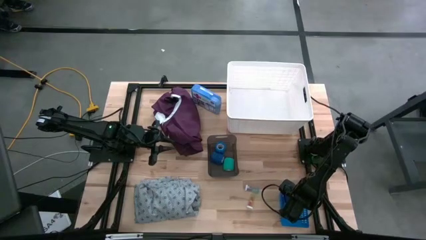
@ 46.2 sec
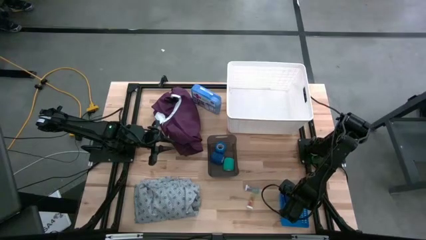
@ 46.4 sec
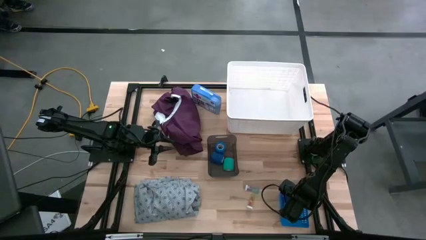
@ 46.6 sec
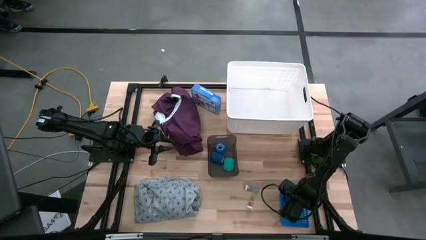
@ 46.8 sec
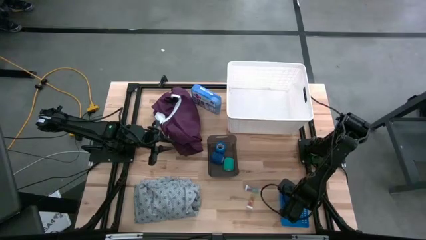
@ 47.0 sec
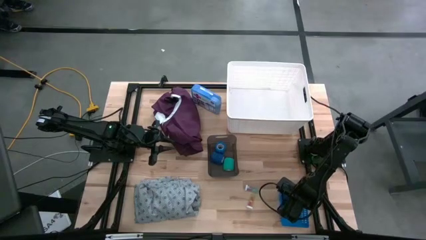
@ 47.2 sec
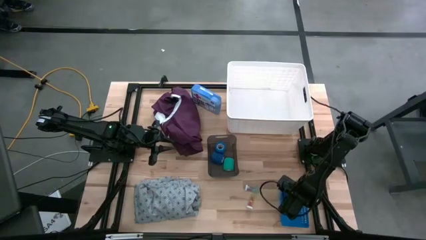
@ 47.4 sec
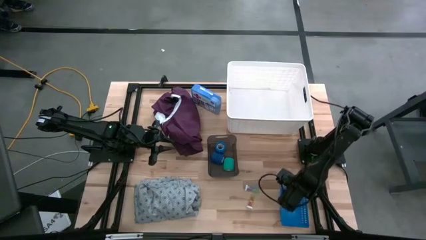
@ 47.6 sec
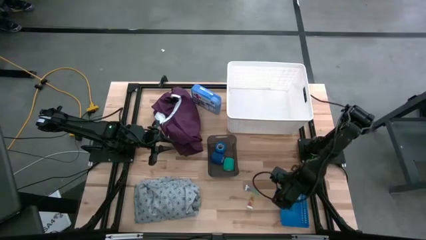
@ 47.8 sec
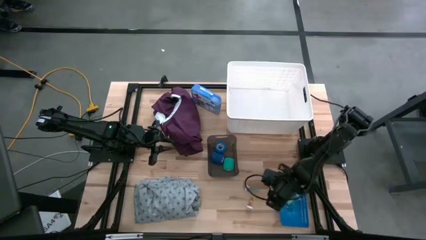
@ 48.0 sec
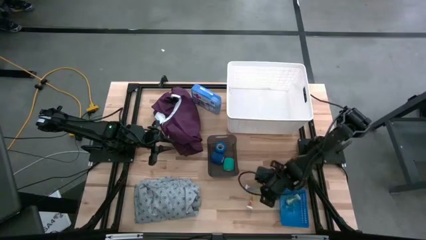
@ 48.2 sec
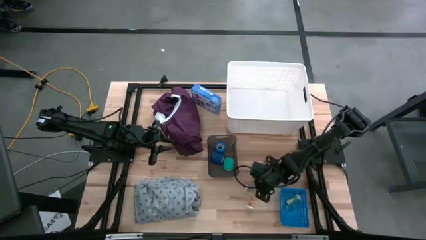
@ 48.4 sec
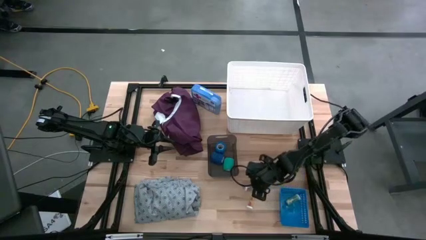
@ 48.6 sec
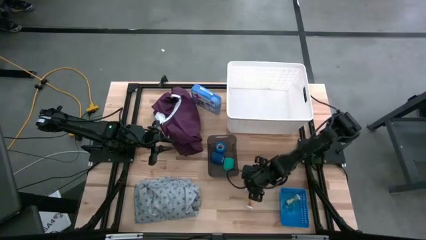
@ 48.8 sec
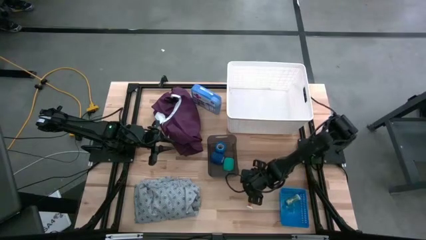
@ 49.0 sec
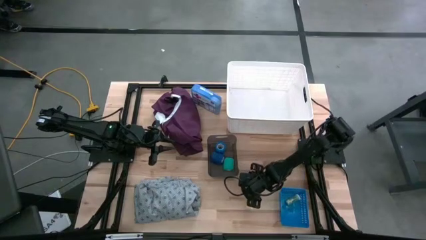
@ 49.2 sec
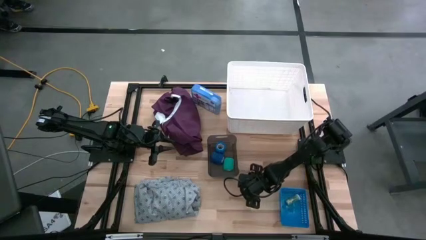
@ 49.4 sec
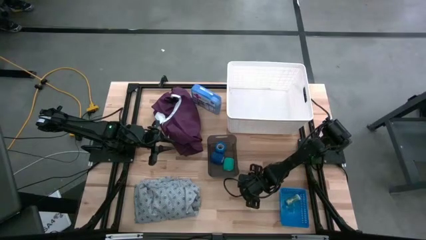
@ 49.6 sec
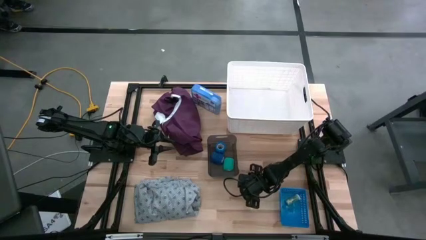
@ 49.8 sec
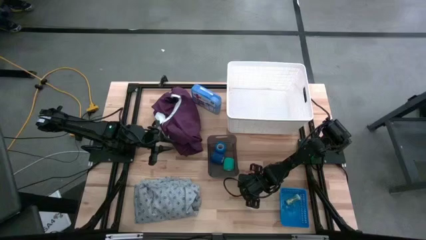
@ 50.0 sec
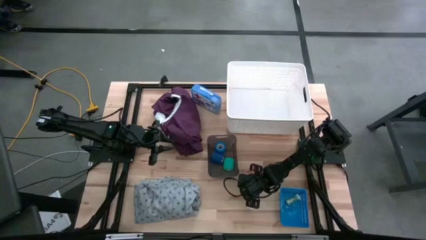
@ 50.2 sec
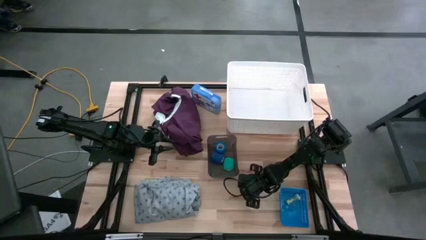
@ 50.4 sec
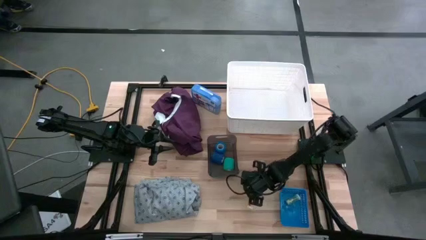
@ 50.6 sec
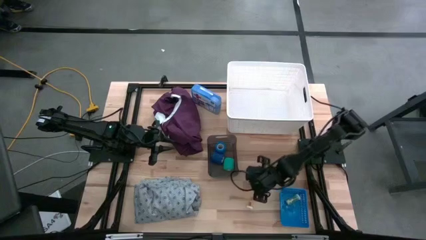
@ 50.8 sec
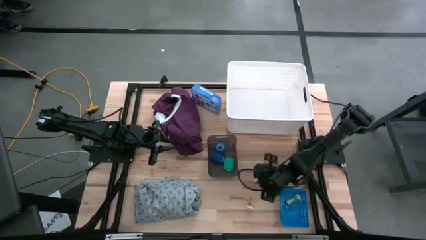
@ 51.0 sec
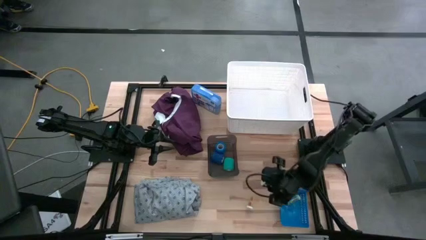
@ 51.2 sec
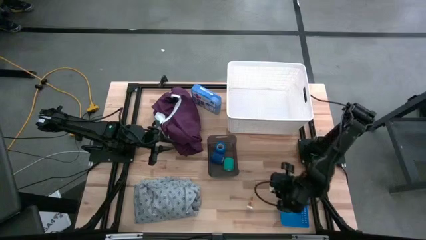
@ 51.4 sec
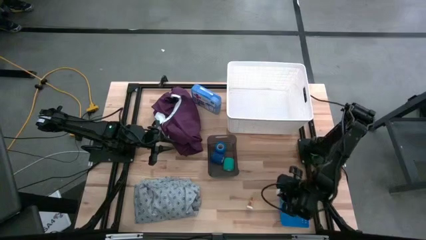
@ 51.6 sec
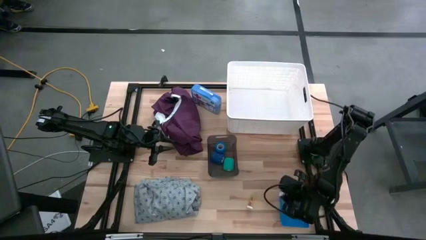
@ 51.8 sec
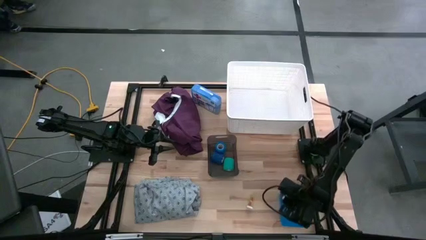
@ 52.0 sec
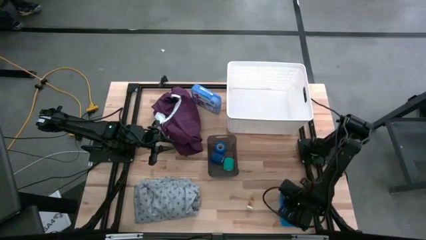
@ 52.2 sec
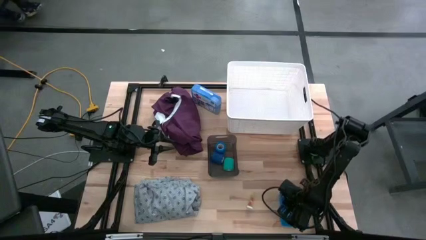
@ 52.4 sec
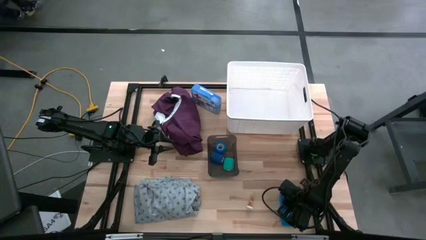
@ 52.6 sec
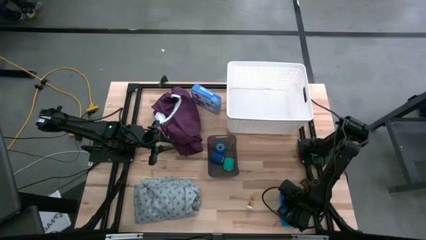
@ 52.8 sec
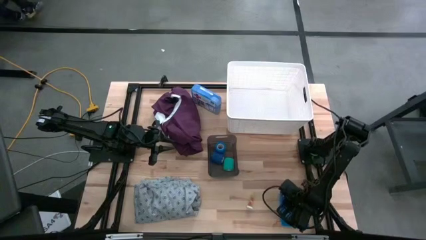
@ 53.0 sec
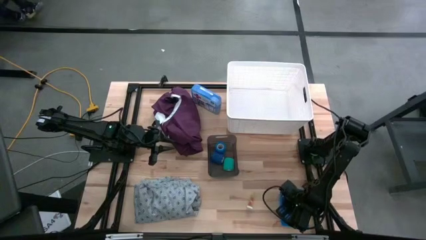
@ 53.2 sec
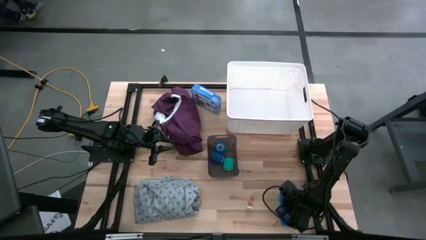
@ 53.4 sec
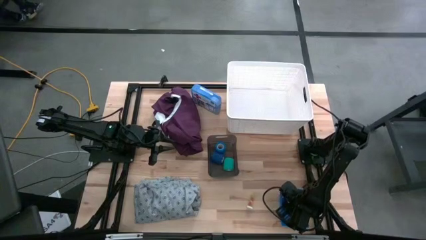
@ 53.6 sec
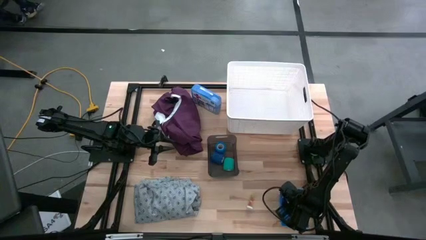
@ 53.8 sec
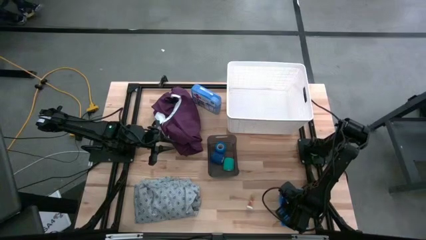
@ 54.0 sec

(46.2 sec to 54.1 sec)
Task: Pick & Place Medicine items
Put the blue pill bottle into the blue bin

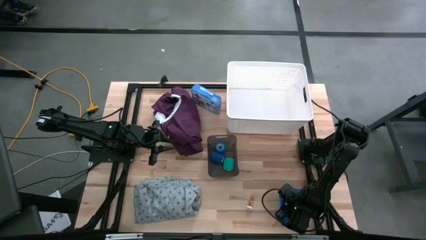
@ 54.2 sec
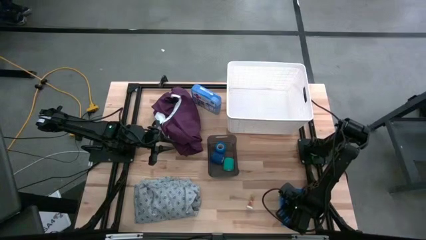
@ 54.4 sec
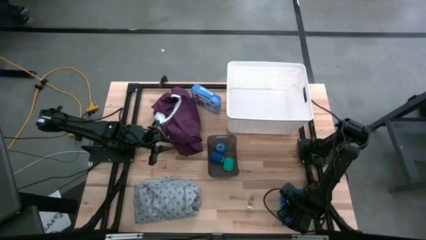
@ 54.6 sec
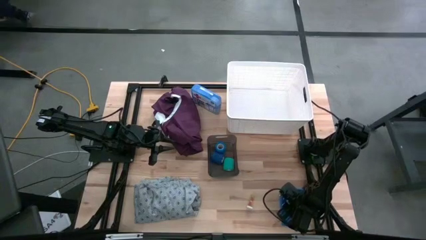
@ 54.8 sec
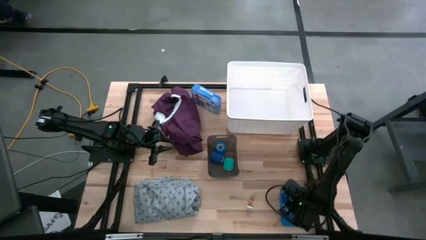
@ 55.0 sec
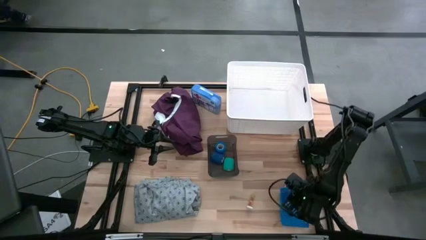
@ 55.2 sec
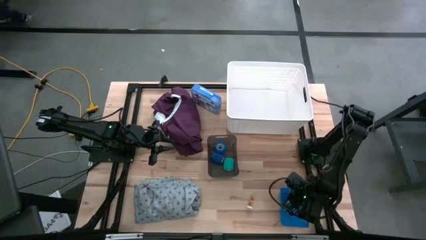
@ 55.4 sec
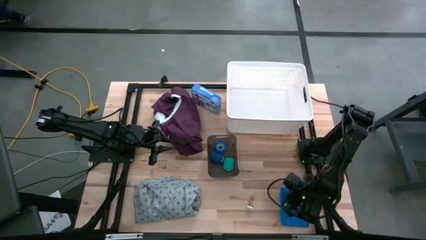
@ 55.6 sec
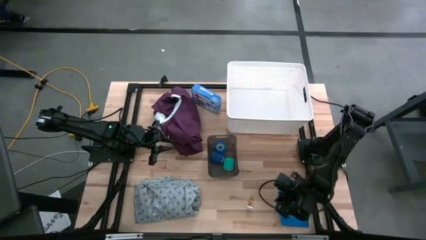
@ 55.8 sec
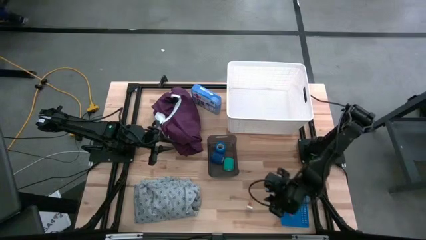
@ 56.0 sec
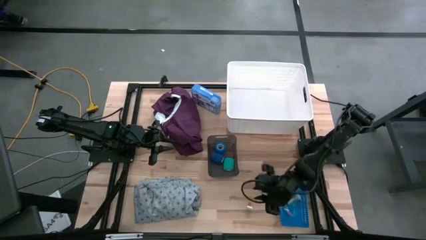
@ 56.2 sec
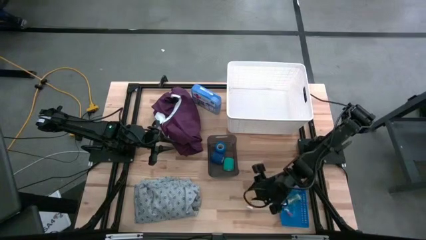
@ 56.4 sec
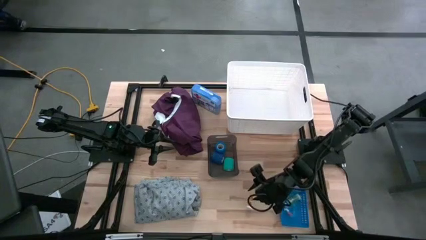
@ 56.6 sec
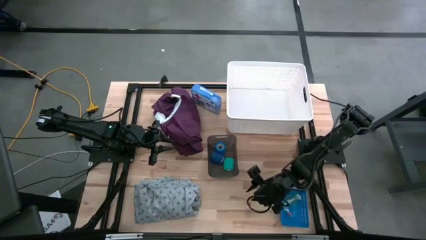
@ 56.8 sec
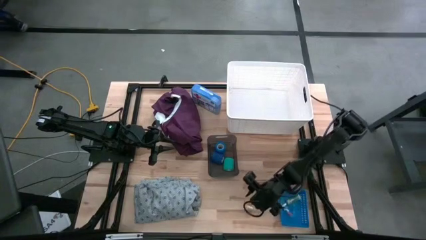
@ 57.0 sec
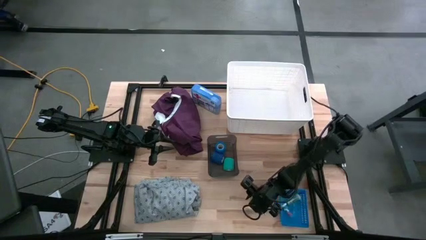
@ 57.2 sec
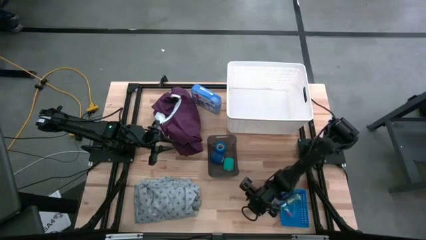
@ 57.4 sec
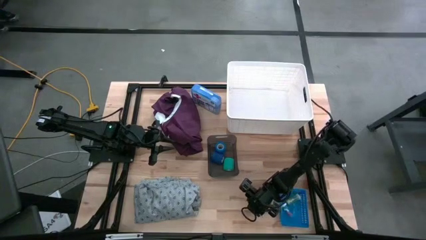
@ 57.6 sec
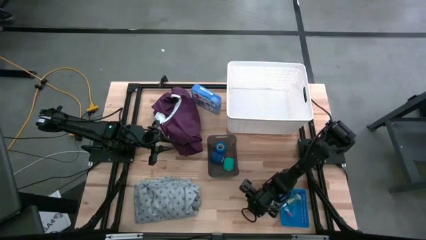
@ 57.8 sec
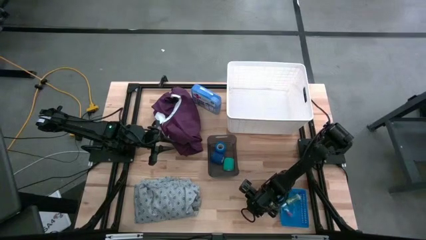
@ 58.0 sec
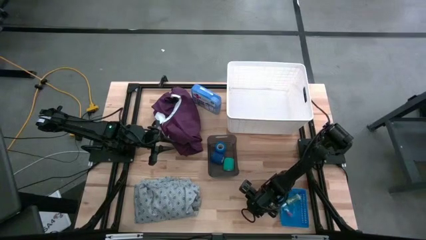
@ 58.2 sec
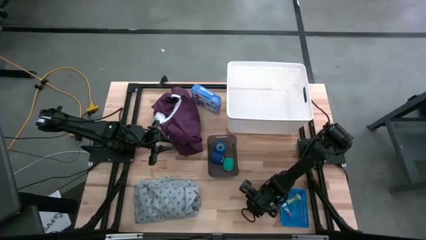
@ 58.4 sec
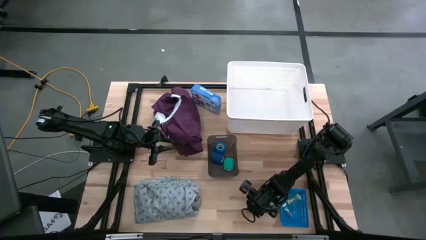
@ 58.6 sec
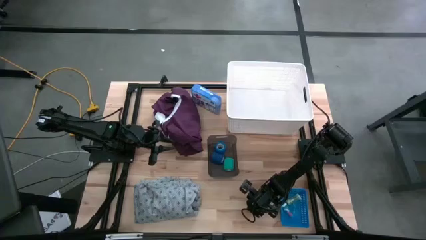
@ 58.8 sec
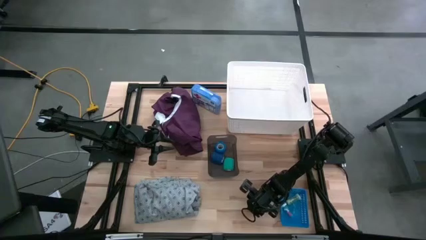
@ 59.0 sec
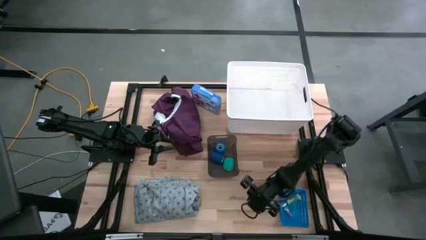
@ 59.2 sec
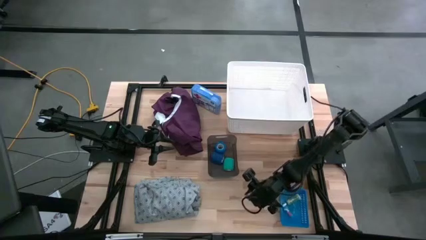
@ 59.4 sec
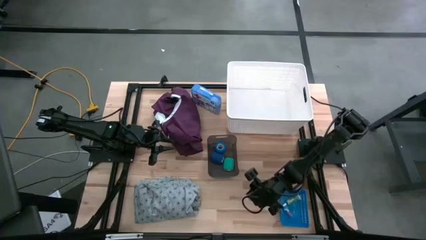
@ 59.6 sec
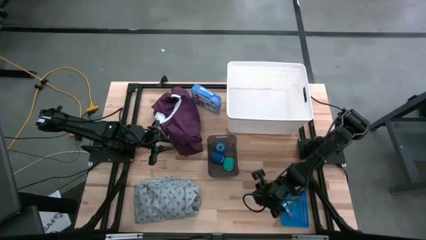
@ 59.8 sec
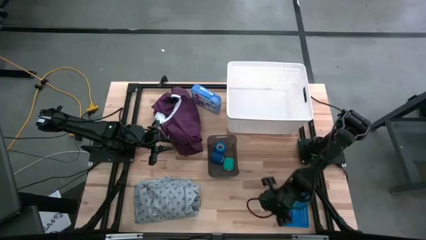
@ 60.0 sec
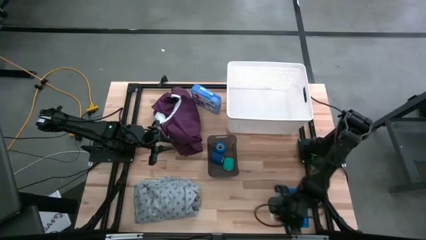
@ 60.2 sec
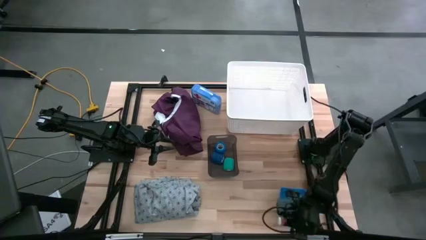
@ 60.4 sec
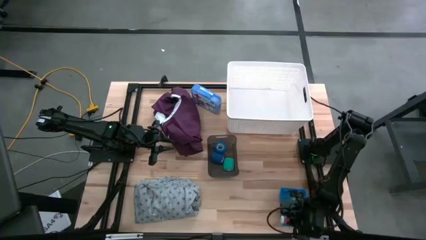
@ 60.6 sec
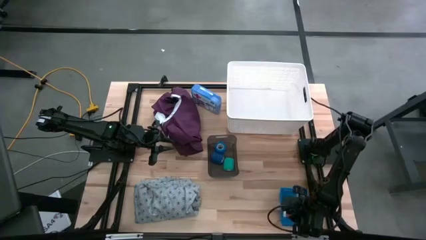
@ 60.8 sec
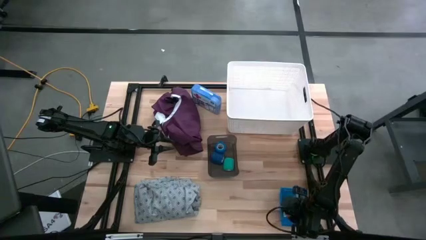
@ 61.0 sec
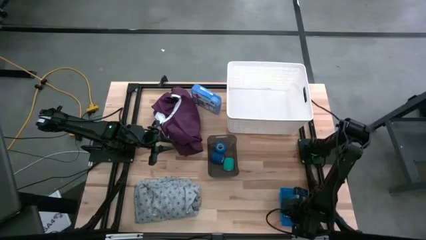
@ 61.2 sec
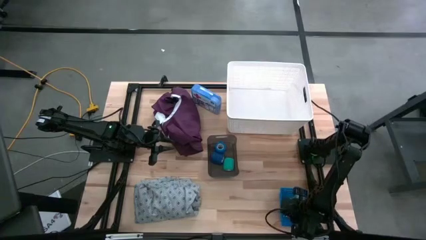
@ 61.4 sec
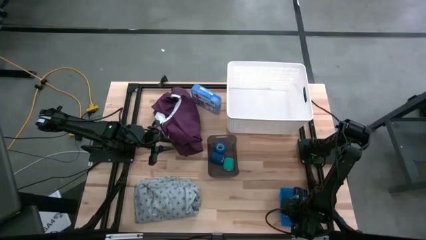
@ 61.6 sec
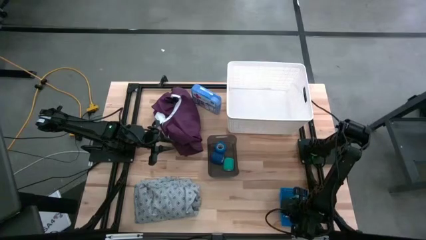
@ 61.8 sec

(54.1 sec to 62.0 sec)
Put the yellow pill bottle into the blue bin
